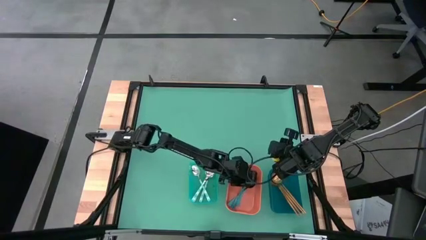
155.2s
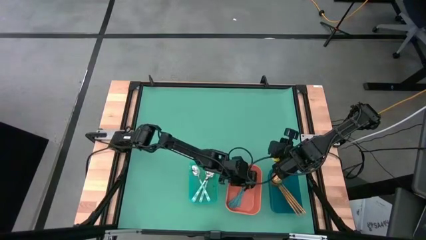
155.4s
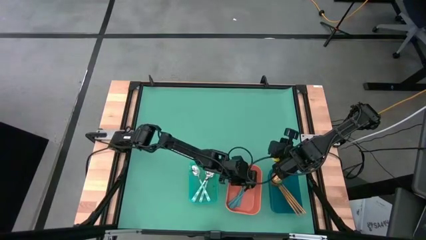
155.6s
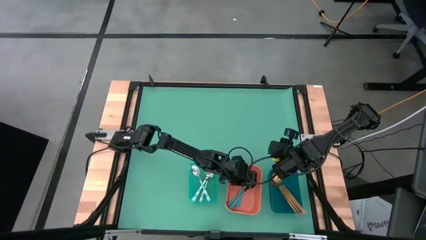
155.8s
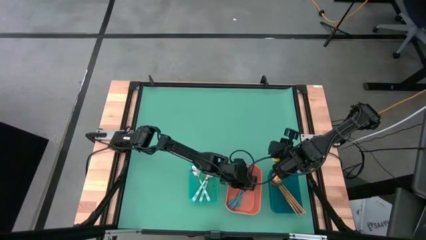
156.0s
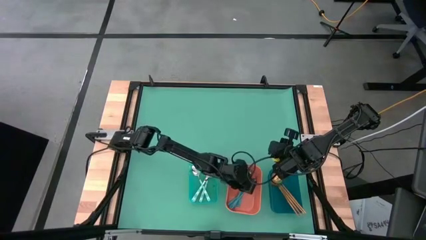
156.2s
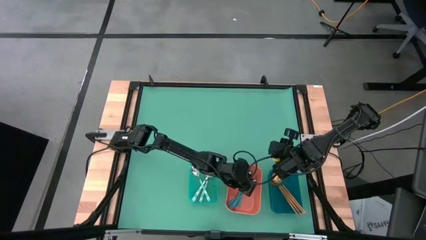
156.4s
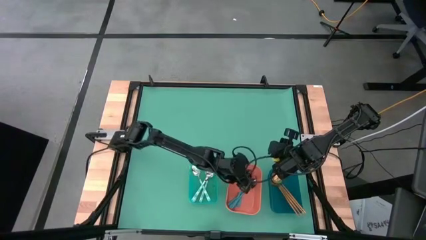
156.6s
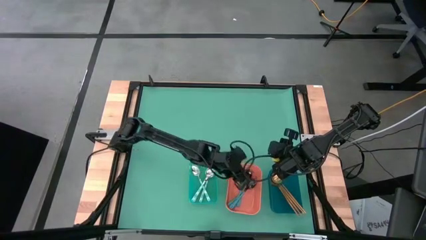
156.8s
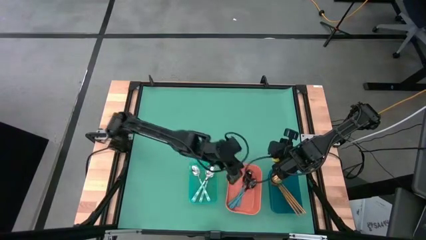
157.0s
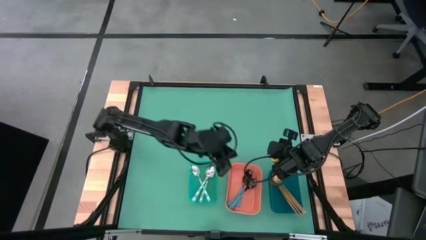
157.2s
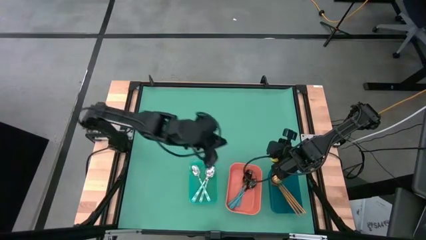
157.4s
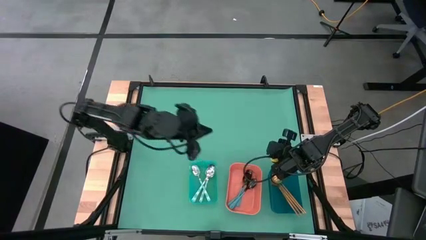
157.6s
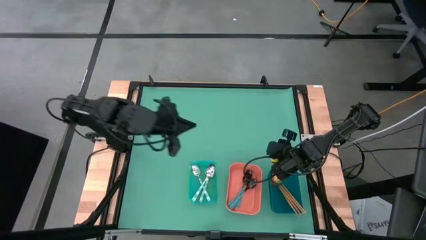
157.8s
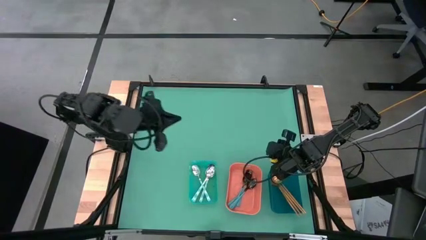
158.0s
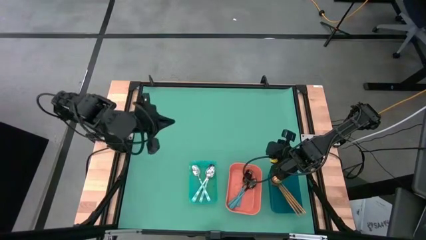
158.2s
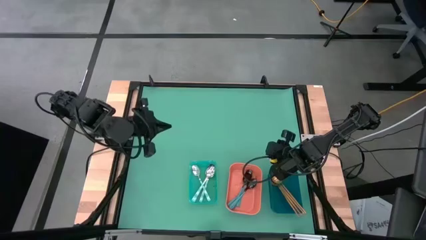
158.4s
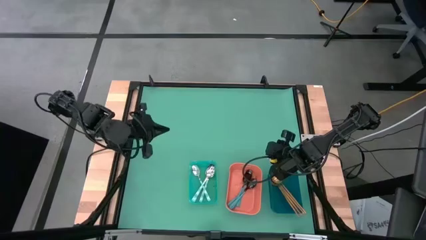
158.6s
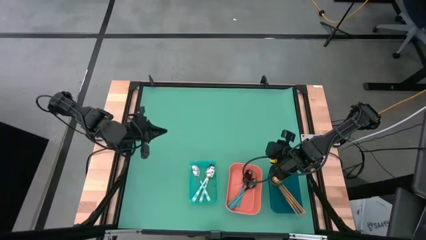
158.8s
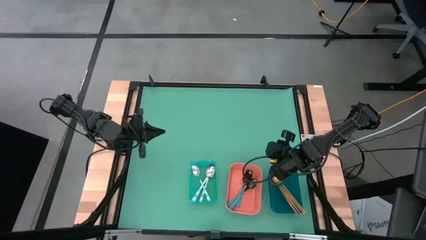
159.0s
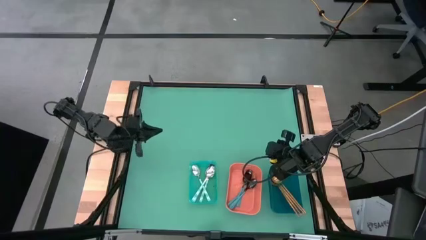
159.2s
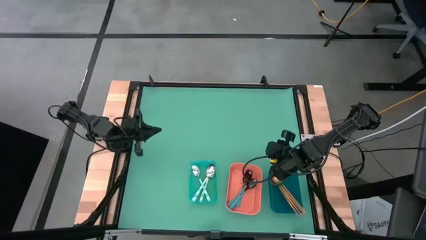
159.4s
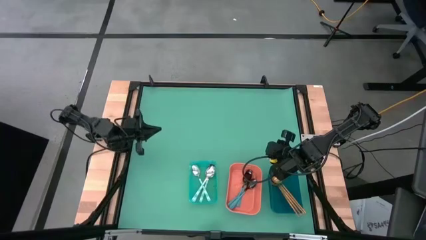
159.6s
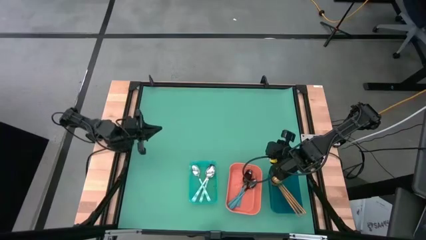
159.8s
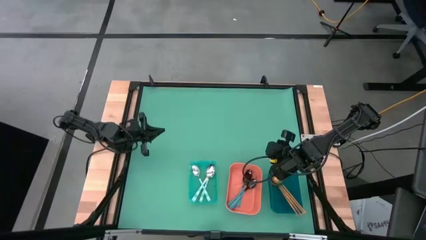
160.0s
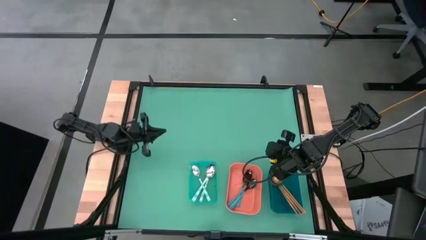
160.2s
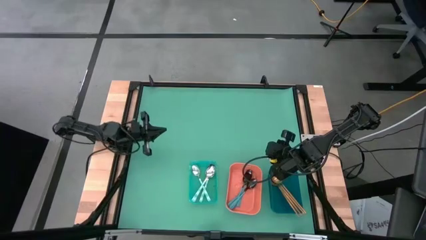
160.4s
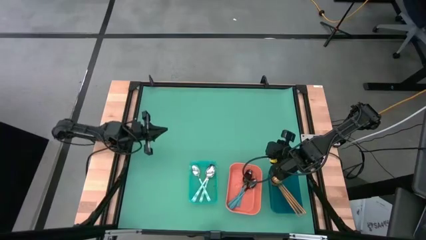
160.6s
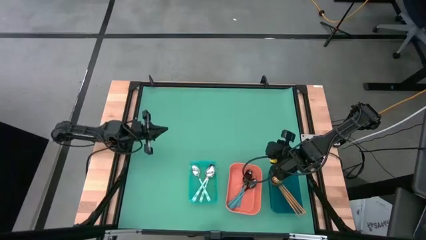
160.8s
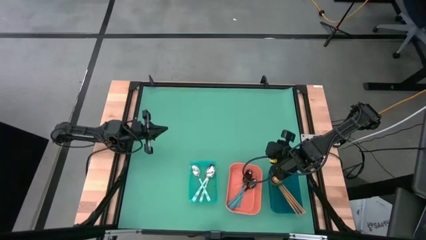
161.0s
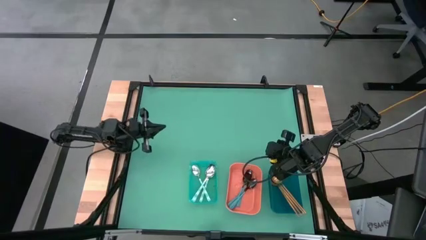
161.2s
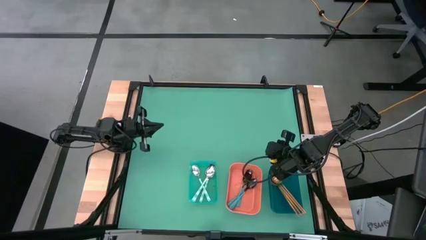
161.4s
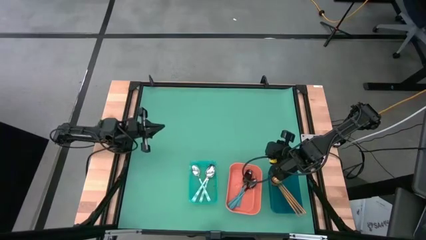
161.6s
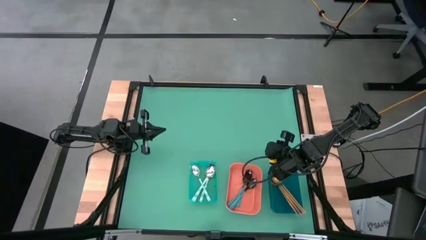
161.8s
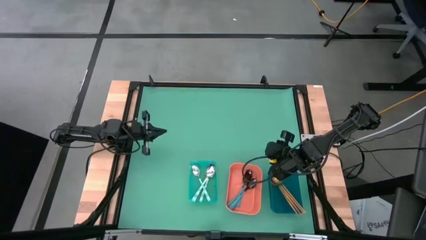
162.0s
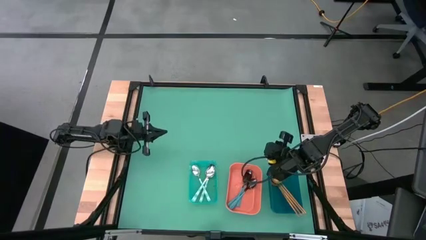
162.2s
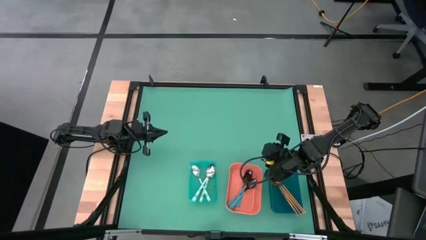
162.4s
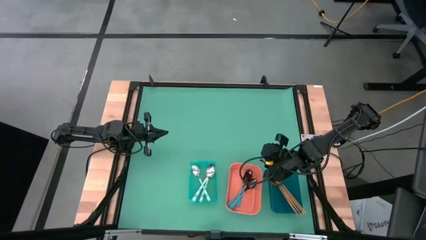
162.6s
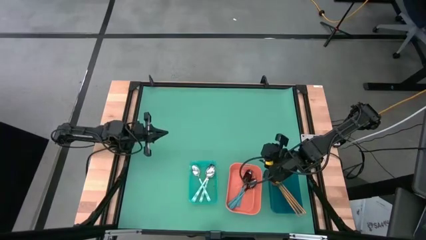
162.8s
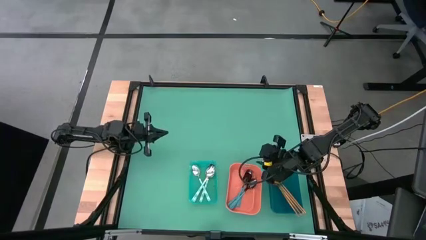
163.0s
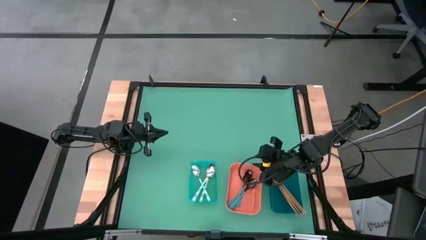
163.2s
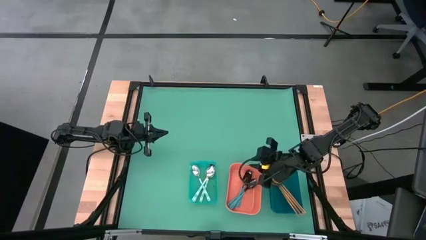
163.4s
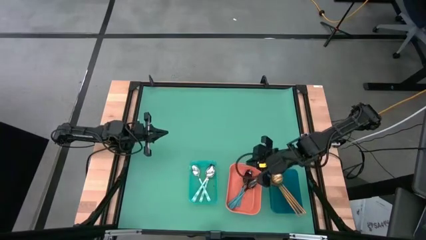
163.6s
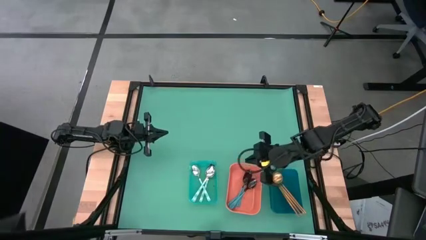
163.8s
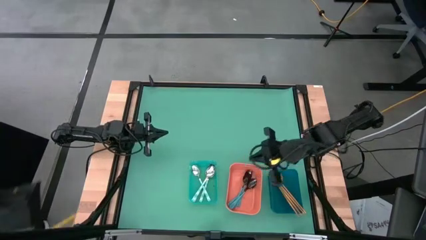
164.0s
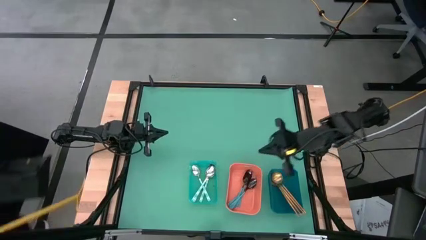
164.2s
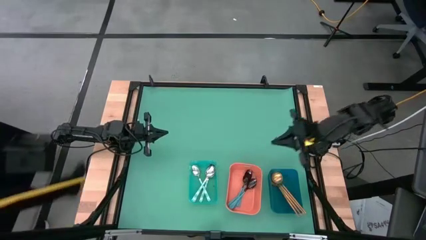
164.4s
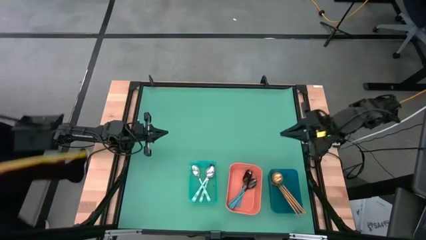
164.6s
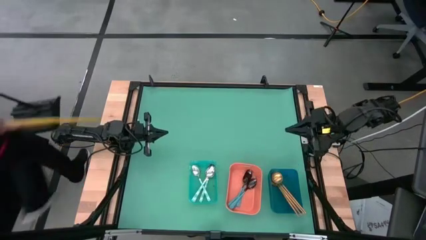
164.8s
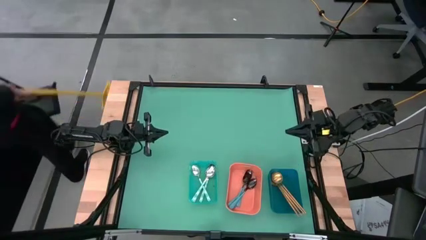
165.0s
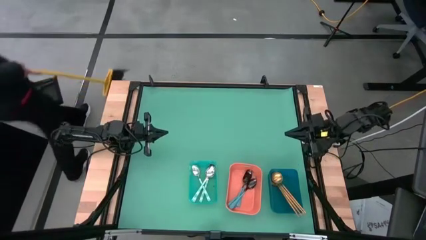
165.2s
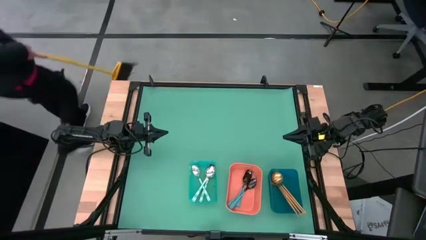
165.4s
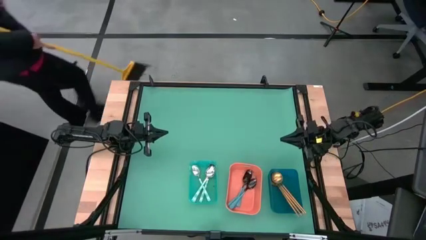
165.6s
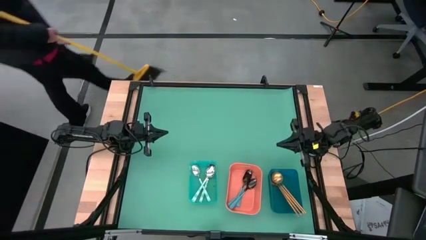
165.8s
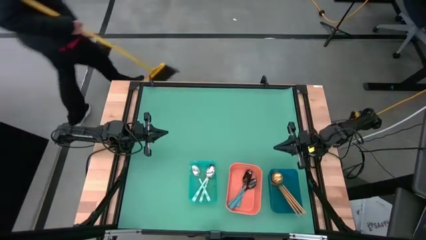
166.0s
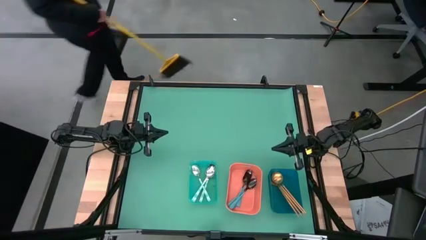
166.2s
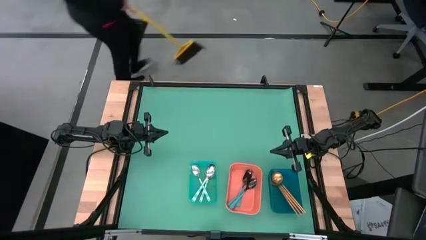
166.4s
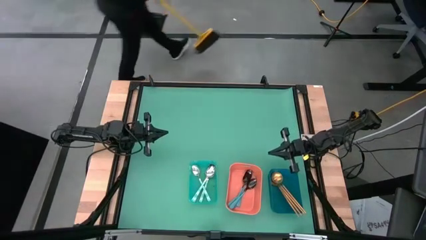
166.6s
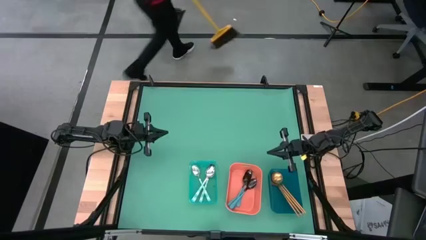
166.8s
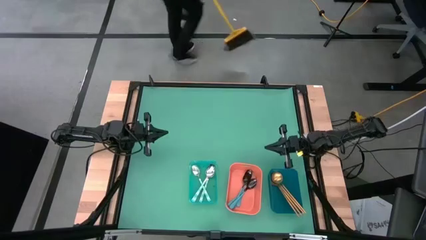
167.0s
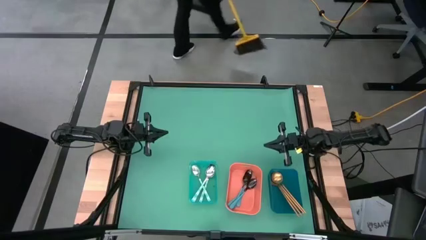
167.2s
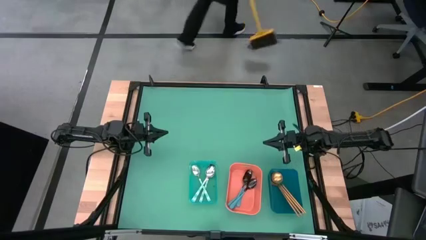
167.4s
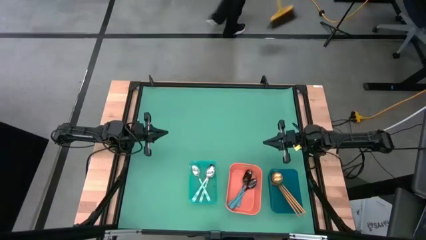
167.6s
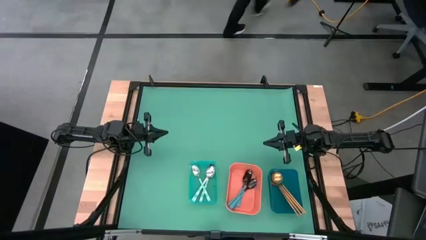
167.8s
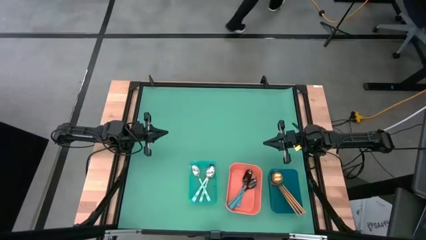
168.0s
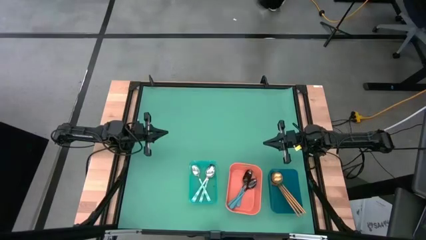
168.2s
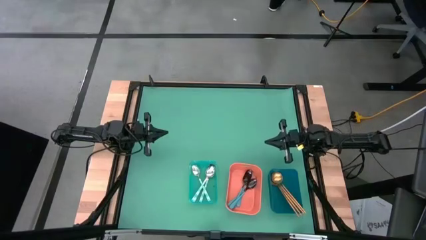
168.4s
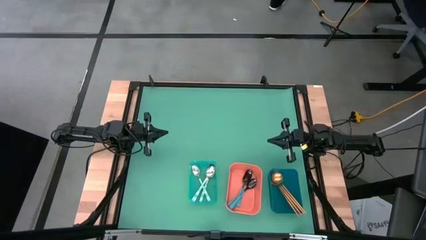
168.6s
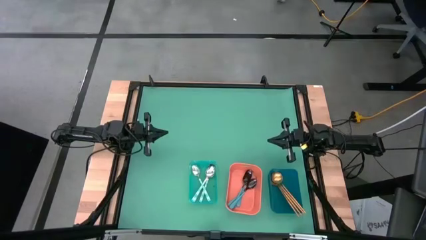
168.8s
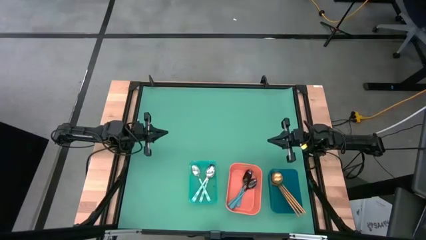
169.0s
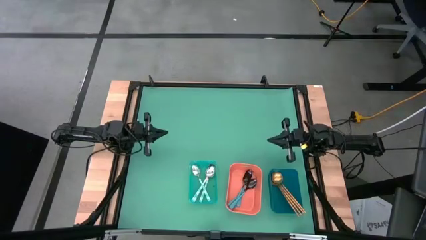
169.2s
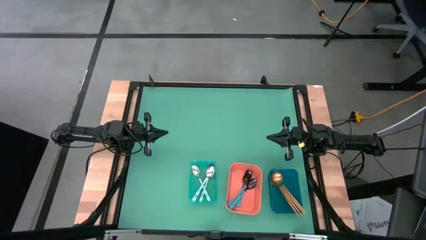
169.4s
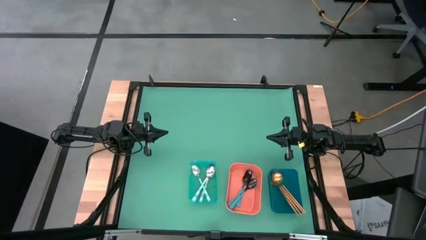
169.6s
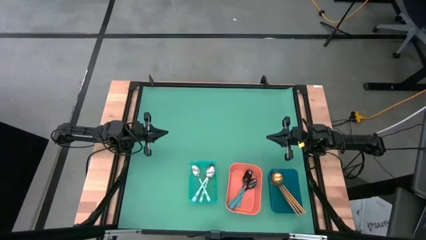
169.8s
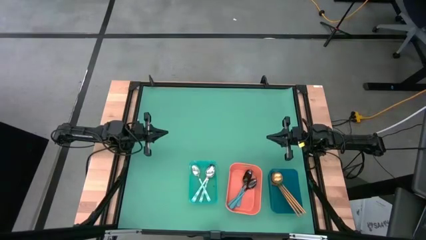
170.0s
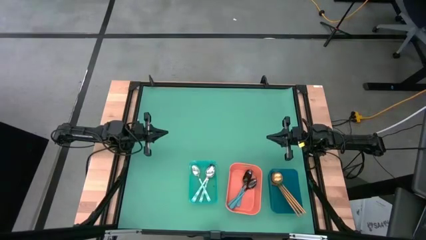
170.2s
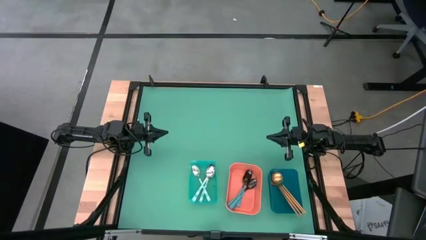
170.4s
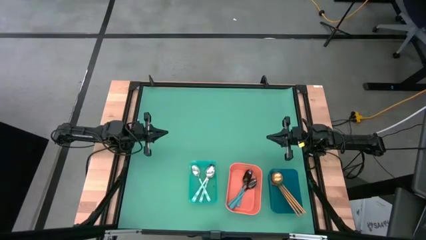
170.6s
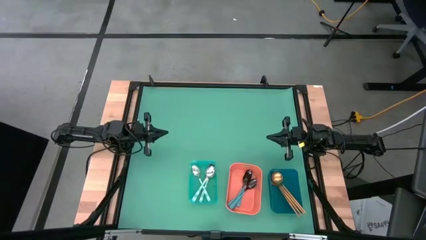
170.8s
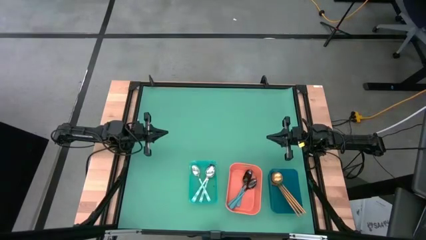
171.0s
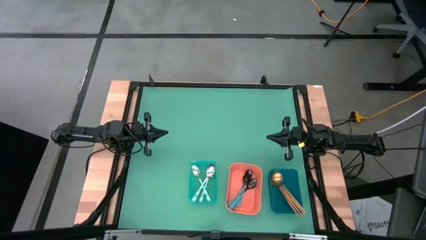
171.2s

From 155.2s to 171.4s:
Task: Sort silverware by color (type)
Return to Home Position
